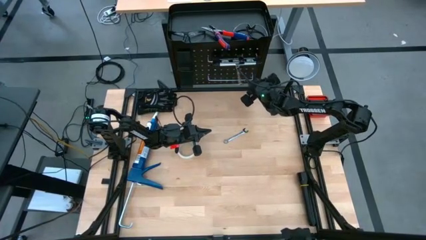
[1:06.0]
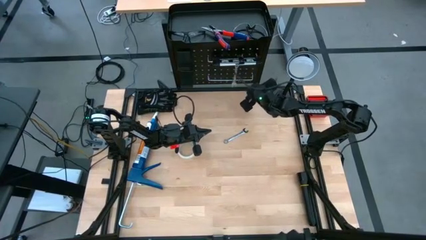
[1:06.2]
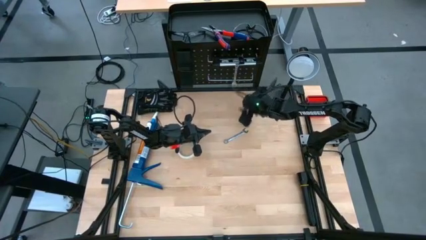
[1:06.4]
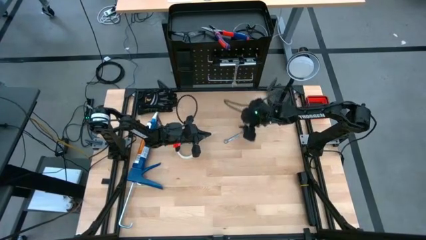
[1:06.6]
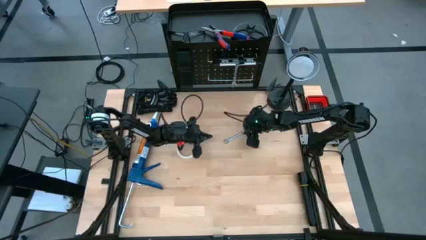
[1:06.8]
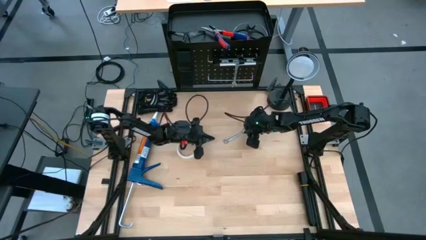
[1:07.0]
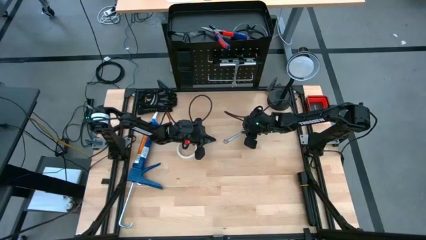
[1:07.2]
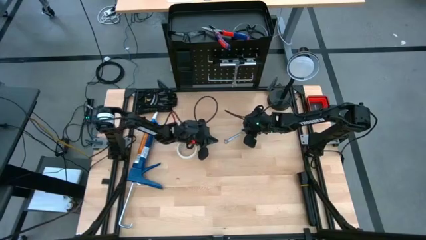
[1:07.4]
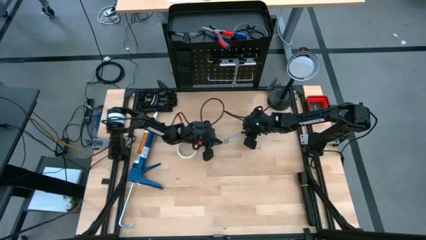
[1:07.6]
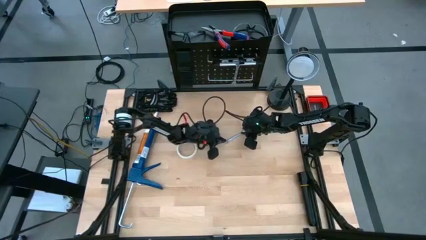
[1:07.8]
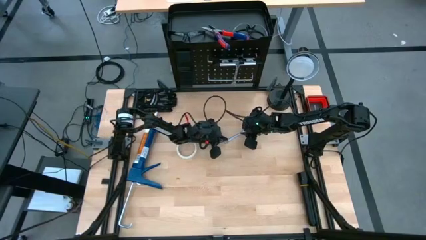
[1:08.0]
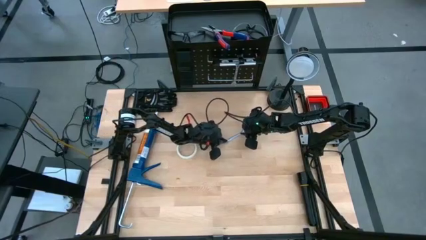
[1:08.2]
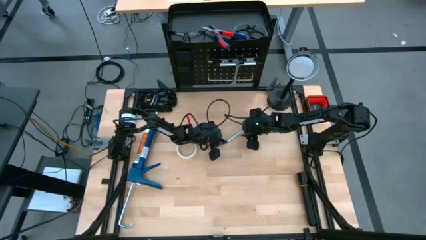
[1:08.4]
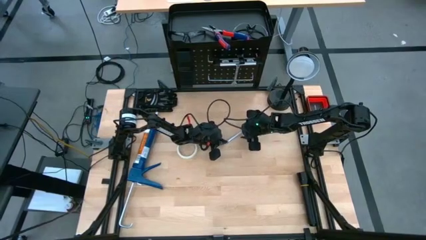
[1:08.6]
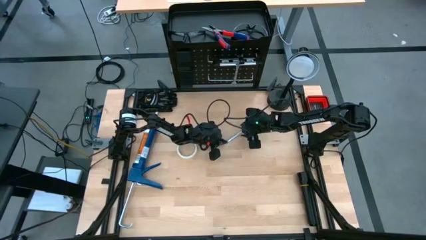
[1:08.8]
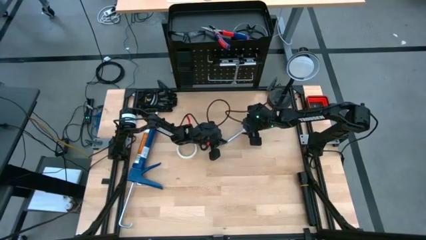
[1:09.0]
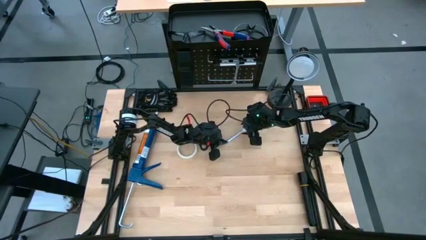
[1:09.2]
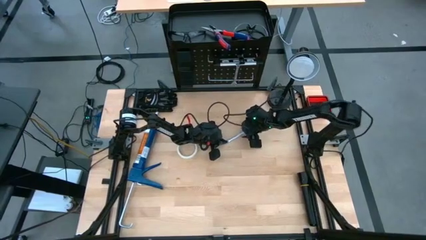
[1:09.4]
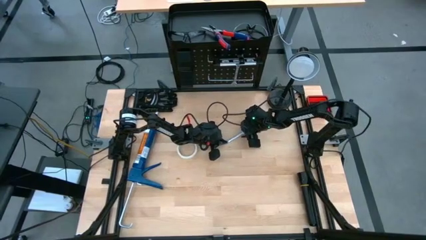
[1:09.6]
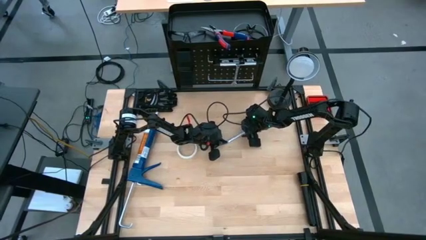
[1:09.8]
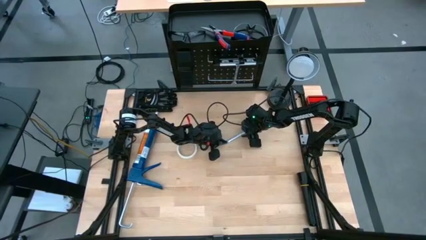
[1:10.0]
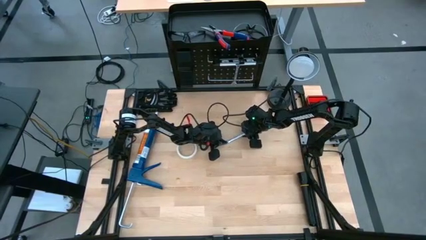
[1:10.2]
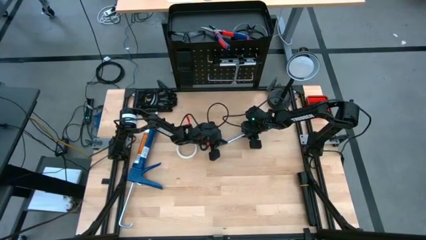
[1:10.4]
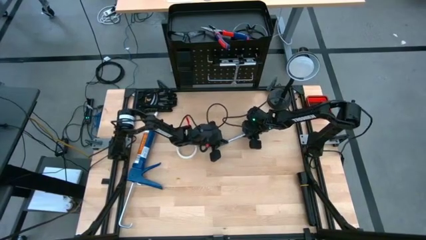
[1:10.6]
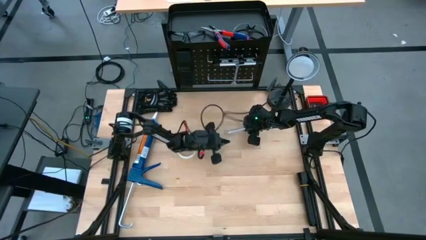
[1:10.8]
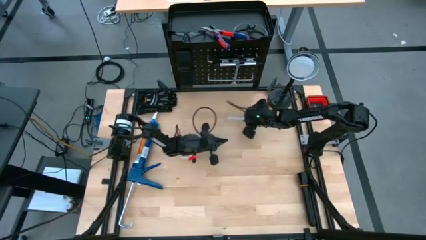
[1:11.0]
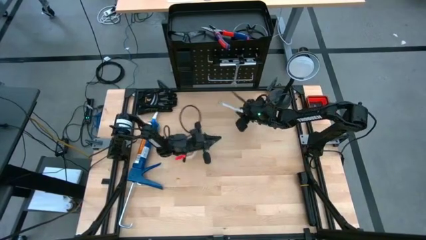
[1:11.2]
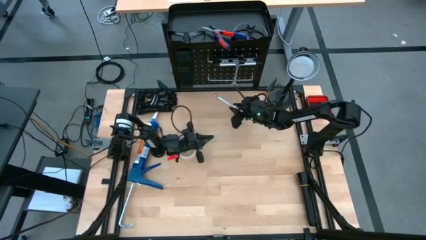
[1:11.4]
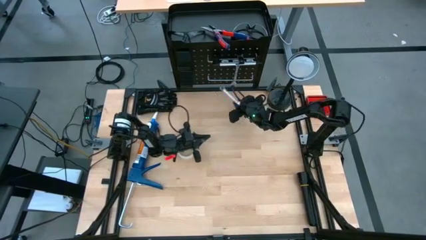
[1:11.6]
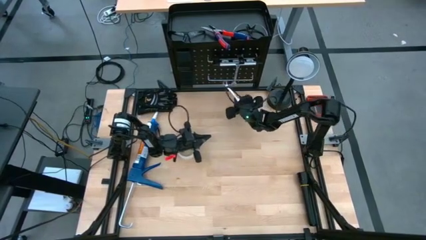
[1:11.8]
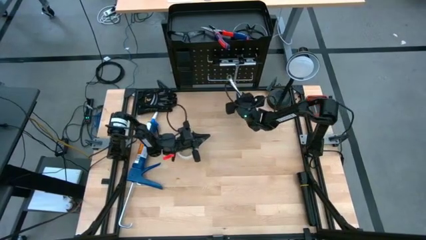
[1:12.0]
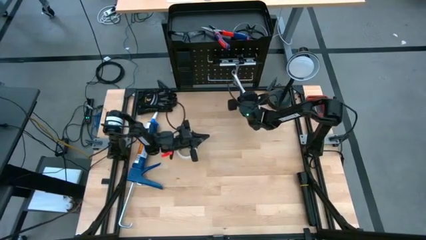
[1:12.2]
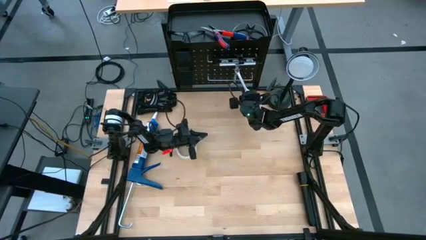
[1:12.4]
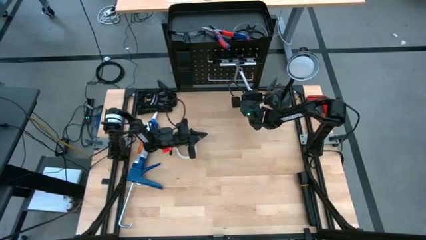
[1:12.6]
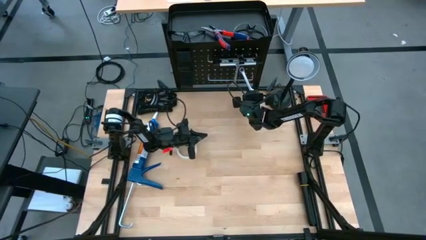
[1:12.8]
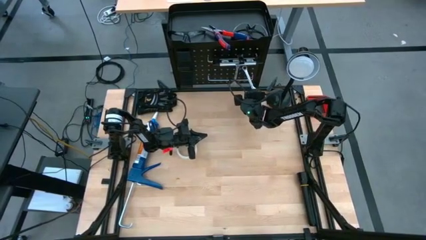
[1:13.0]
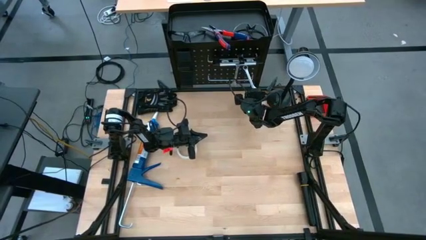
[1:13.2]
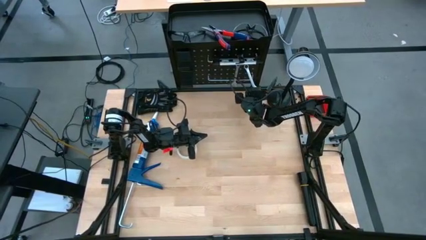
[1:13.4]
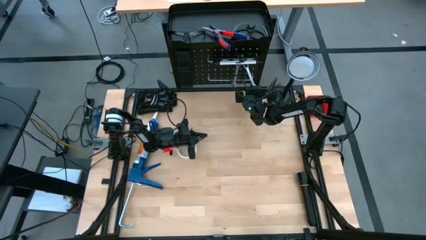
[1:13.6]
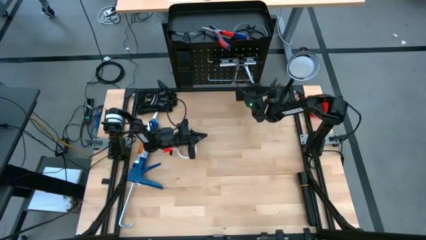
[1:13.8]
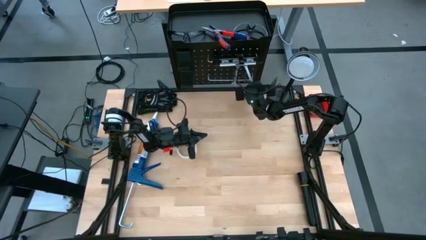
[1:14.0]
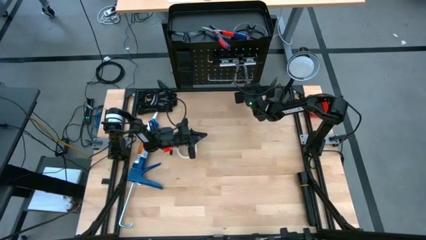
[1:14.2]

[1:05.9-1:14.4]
Task: Hang tools onto peg board
Hang the silver wrench on the black peg board

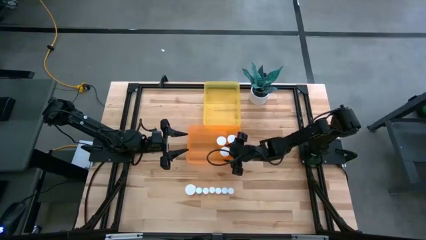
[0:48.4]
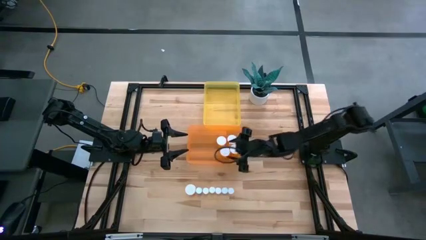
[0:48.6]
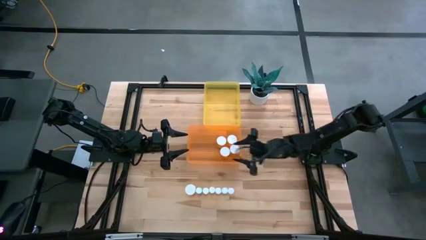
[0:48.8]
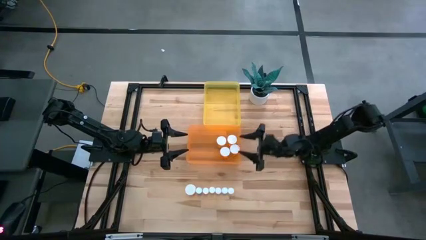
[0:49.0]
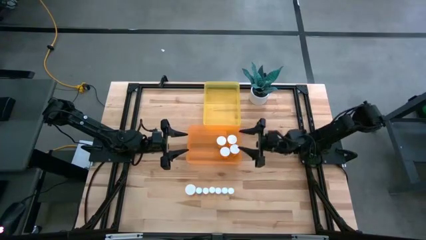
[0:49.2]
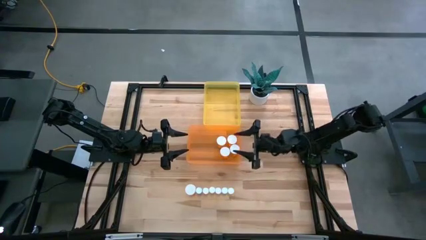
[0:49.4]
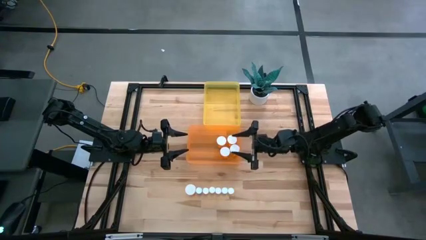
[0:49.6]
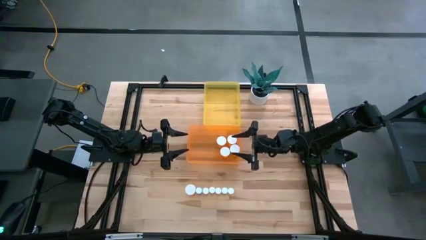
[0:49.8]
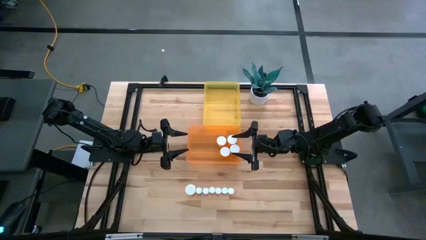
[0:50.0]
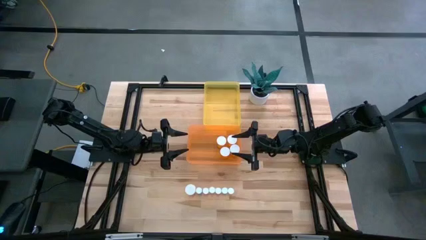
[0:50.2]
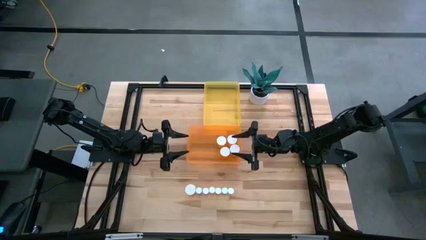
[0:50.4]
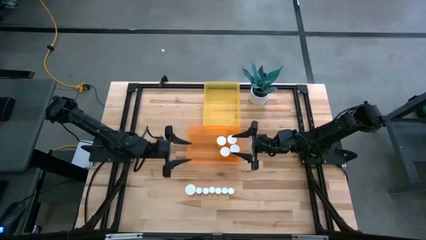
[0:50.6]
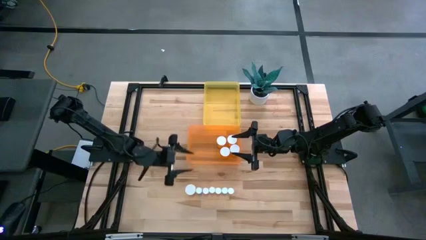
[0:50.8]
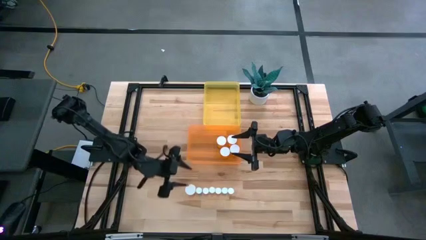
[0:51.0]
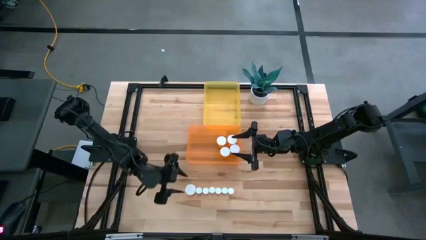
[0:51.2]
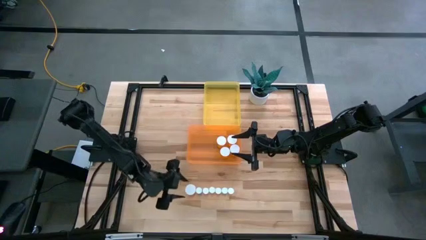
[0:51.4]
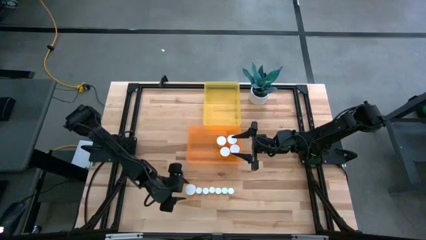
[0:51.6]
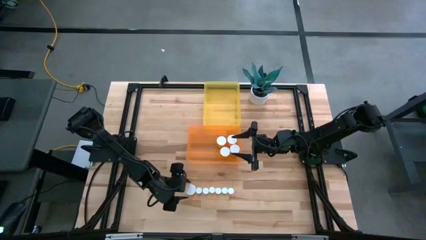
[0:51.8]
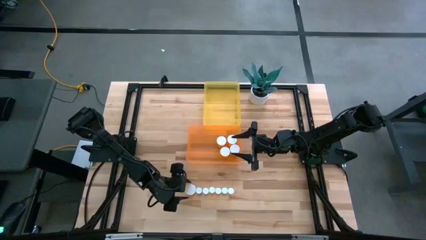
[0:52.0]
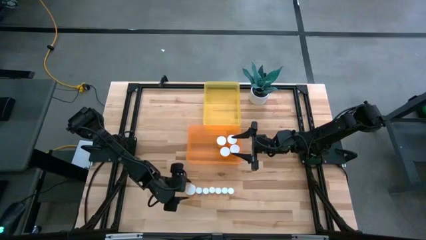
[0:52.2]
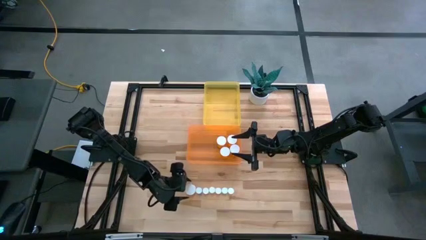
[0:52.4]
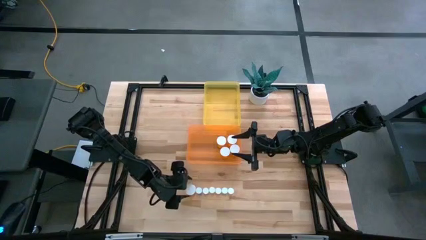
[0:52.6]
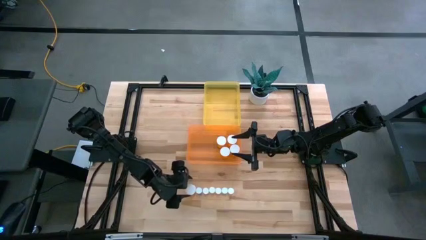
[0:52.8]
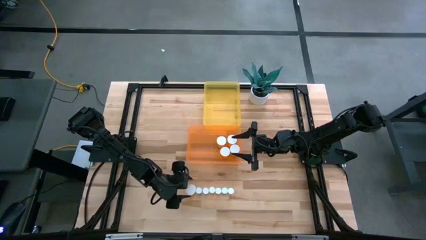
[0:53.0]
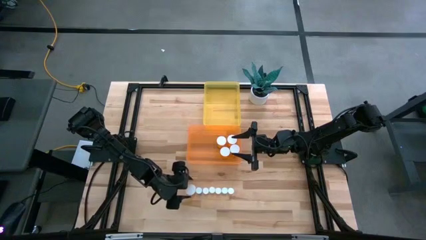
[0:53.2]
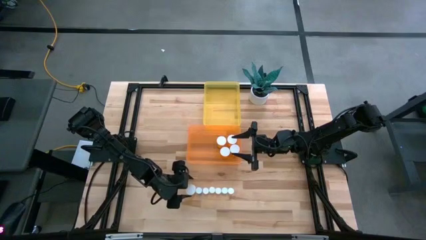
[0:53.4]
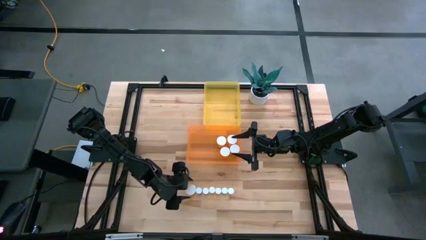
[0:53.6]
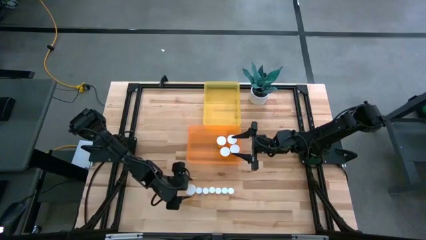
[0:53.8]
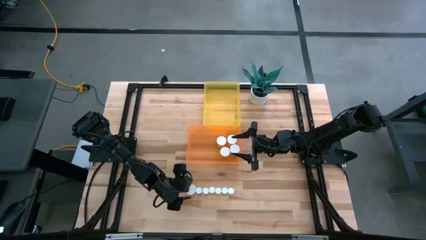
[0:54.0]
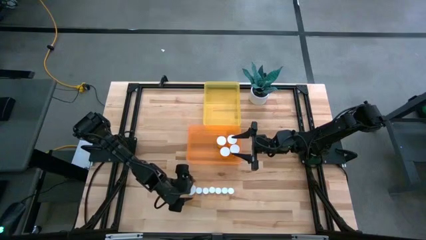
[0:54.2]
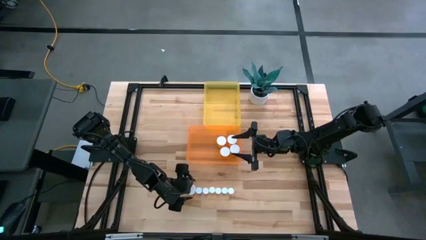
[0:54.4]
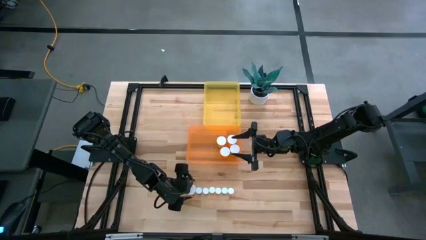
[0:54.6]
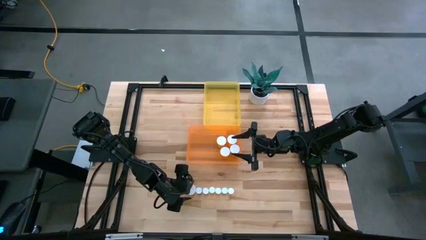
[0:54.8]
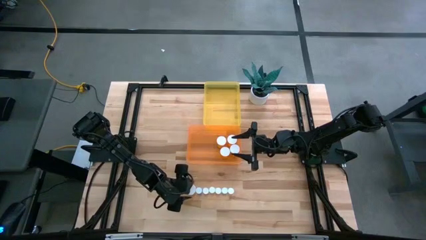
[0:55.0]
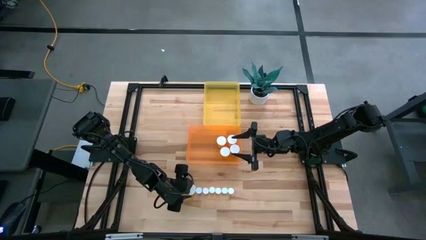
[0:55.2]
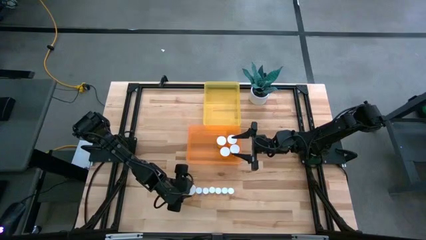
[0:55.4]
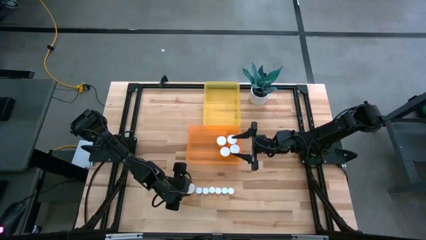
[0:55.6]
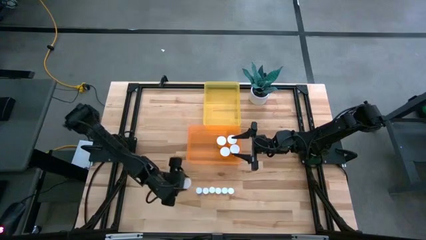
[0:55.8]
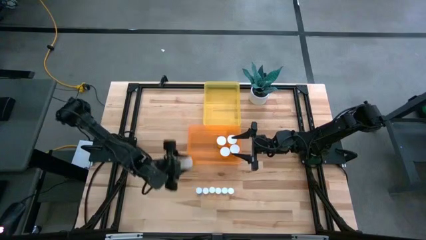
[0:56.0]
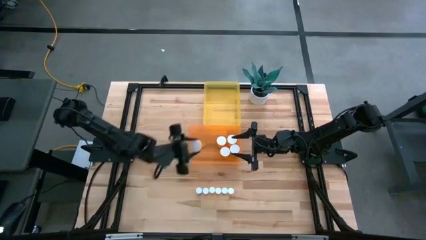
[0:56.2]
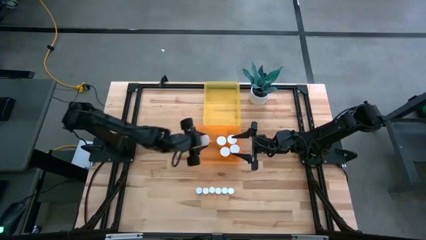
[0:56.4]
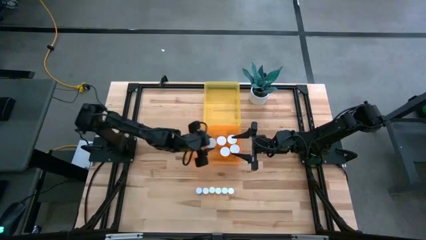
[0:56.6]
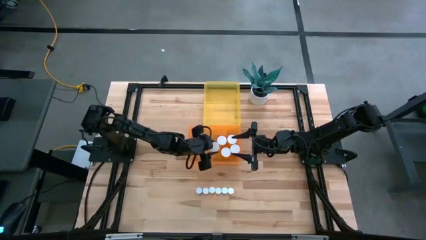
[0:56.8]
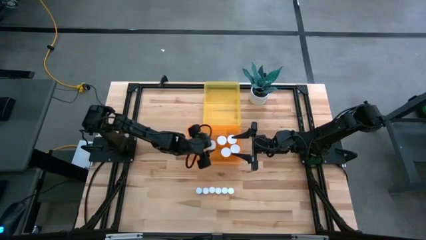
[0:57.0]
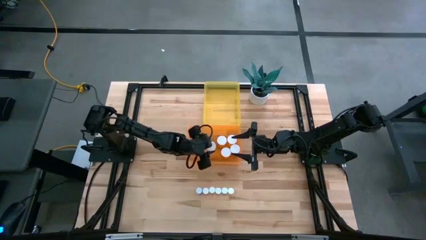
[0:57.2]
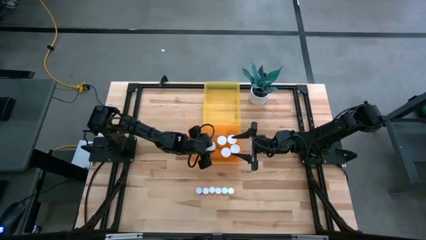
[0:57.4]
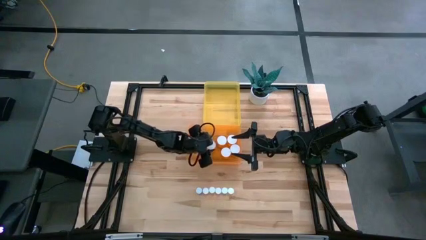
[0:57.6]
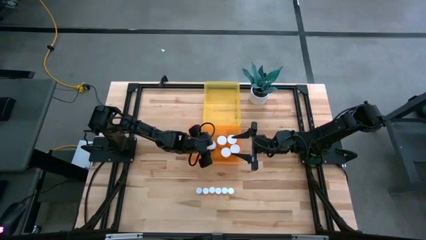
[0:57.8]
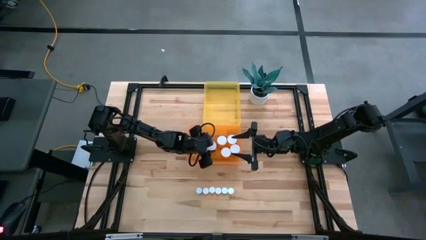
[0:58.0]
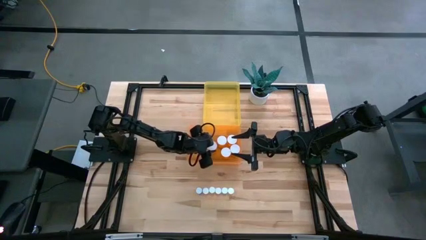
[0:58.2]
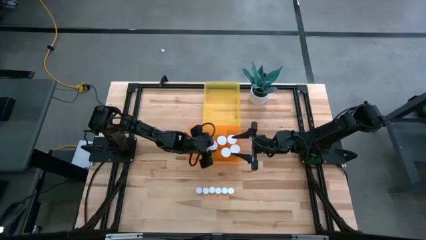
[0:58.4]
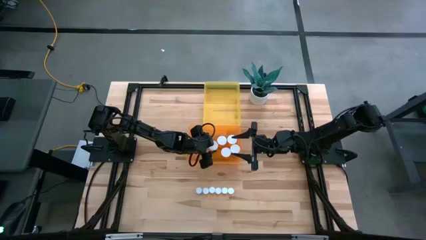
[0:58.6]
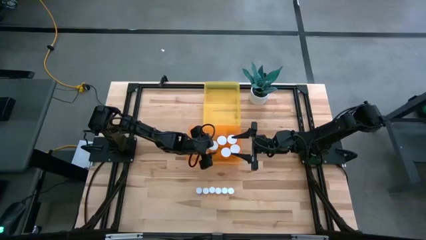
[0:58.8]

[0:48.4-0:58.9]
Task: Pick and place medicine bottles into bin by pill shape (circle, oval)
Put the big orange pill bottle into the orange bin
